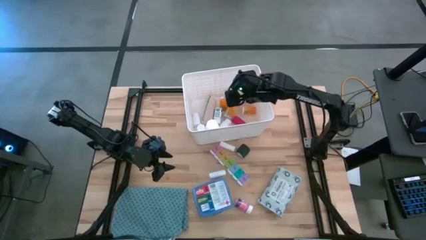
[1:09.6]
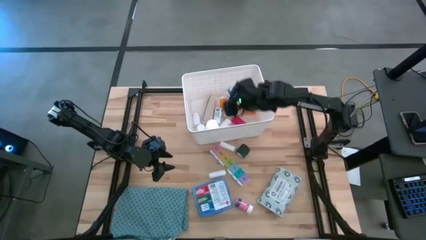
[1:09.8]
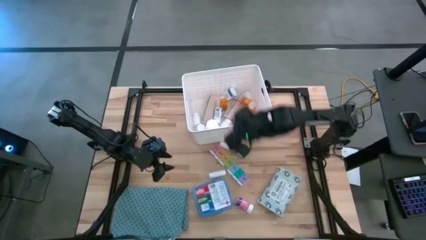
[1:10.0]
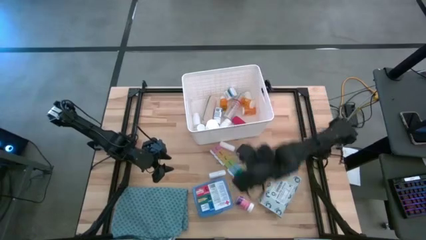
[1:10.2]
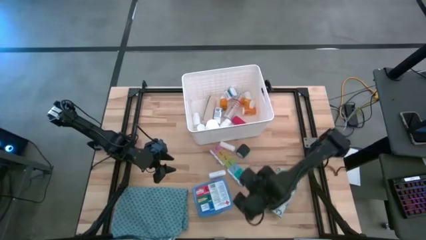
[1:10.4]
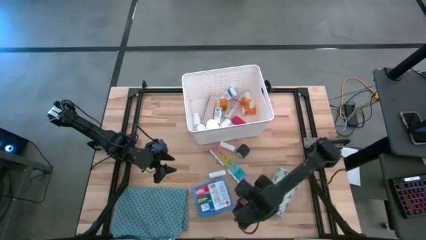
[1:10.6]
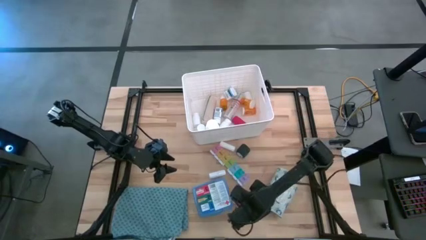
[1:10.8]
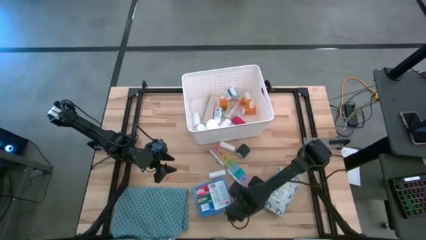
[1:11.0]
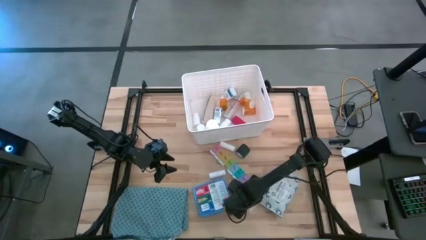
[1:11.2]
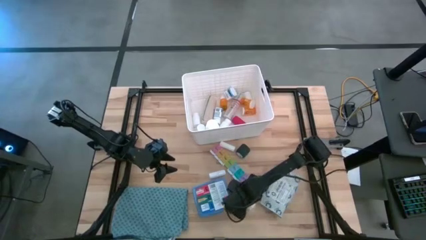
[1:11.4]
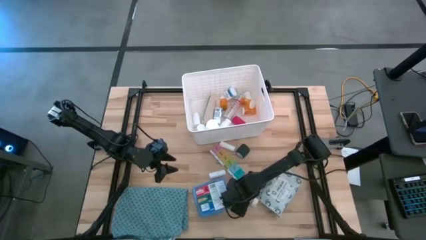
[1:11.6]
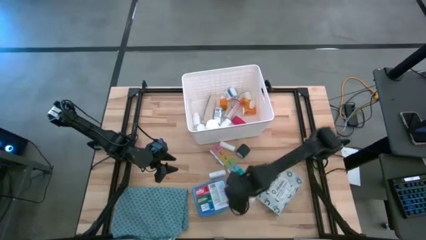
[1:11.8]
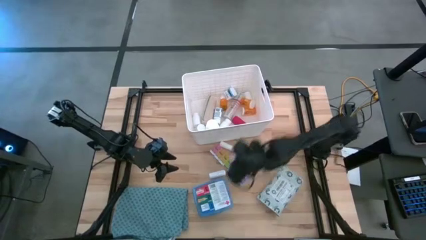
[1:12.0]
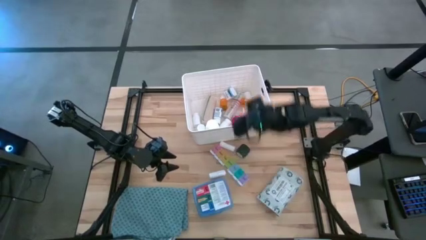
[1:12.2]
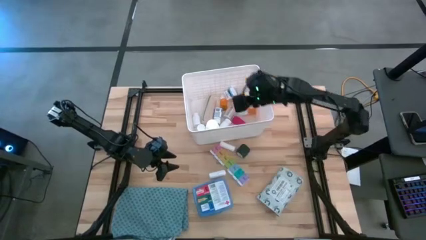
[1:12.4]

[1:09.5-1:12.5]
Task: Pick & place medical supplies in basket/bin
Put the pink medicine bottle into the bin

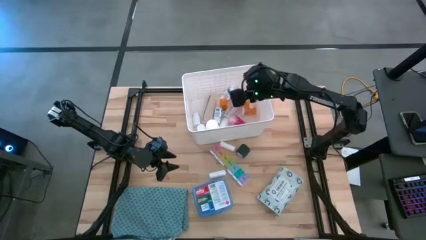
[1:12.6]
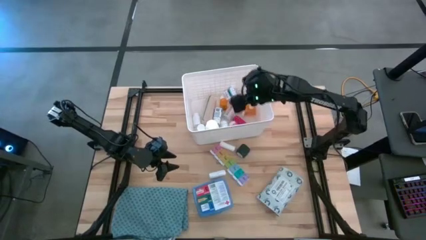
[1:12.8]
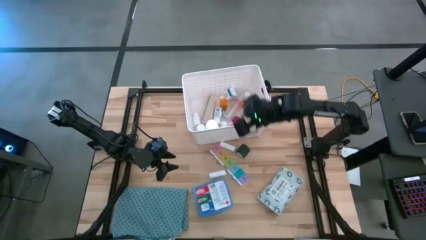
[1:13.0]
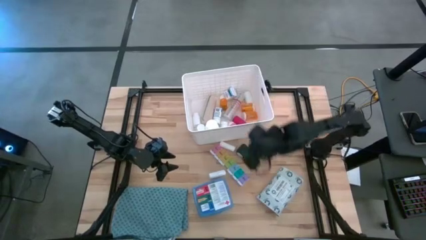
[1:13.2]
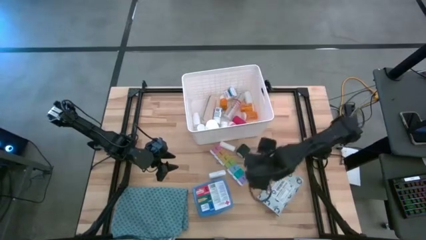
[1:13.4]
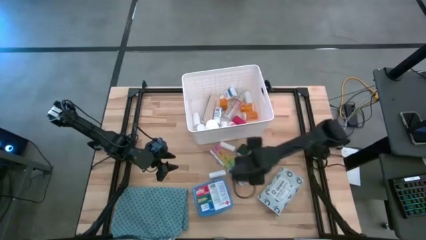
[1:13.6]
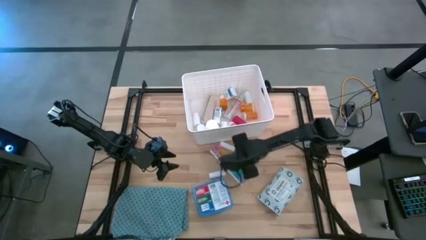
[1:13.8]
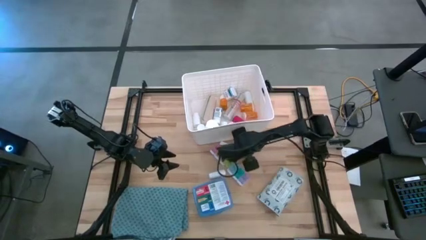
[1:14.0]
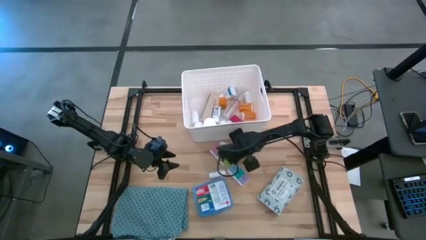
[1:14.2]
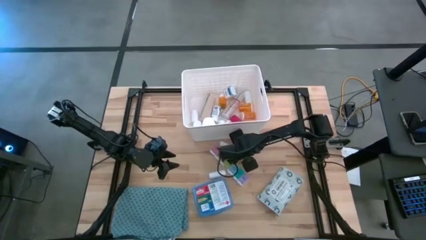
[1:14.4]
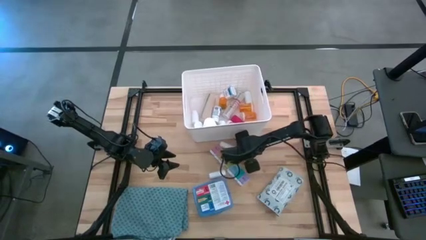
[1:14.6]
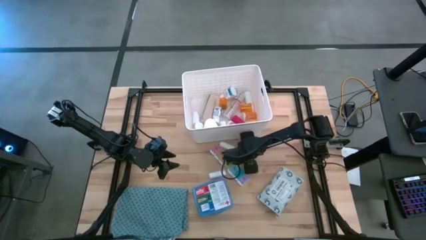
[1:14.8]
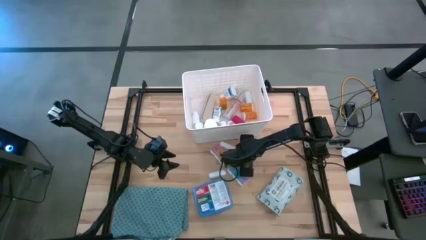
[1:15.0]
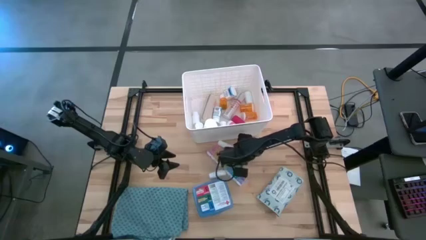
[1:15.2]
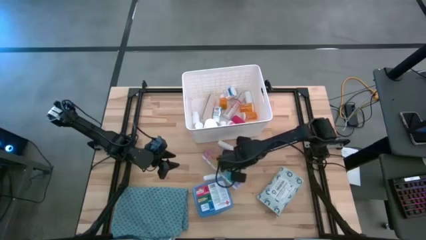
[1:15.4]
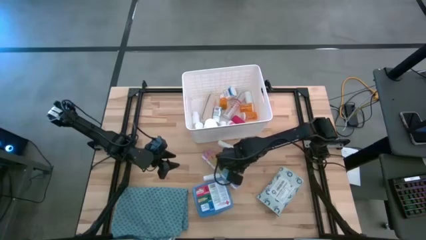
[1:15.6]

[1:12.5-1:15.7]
Put the green bandage into the bin

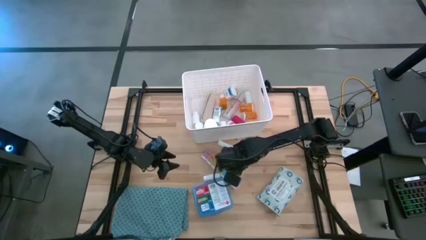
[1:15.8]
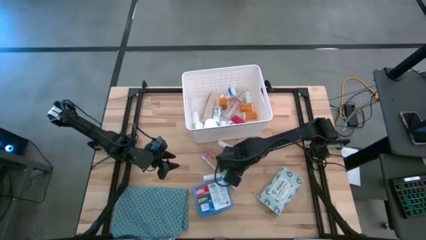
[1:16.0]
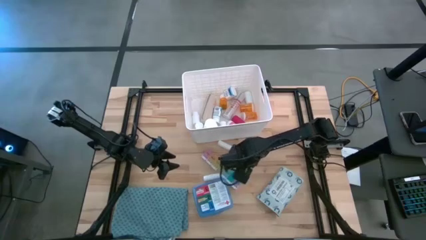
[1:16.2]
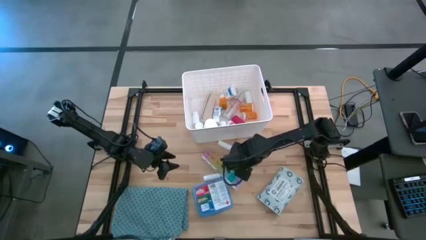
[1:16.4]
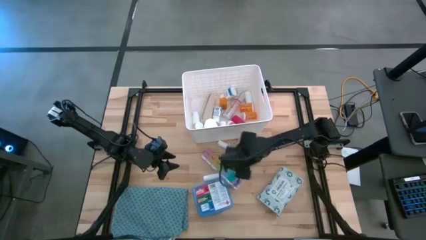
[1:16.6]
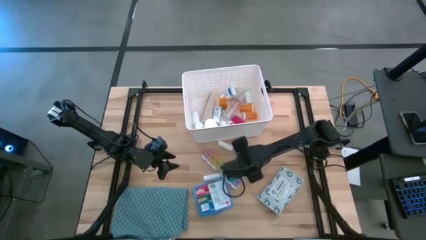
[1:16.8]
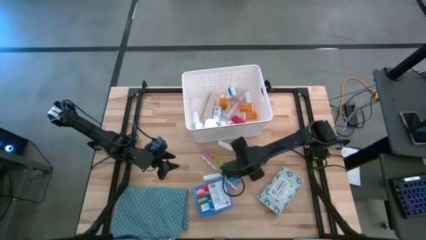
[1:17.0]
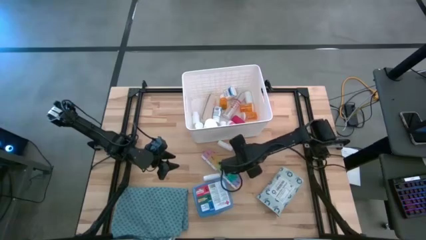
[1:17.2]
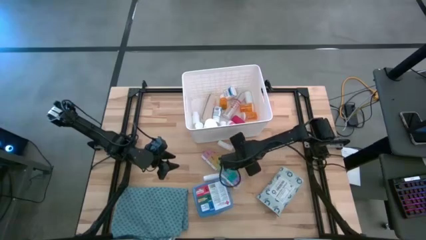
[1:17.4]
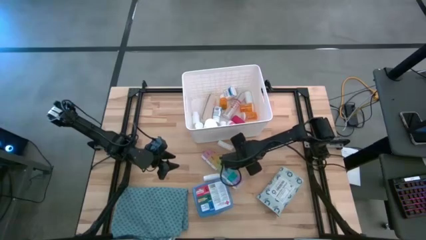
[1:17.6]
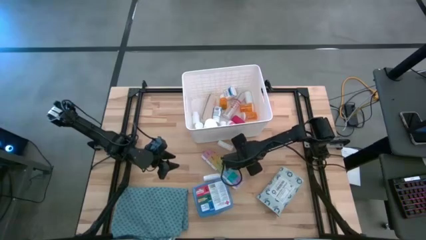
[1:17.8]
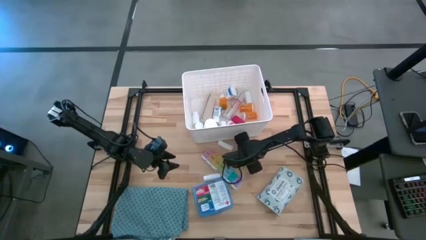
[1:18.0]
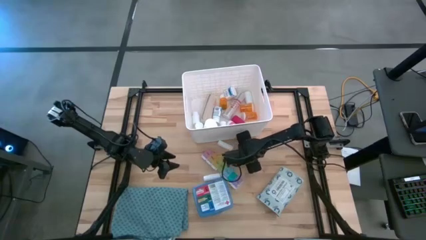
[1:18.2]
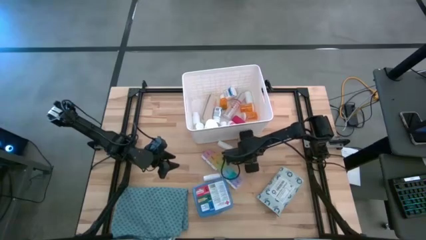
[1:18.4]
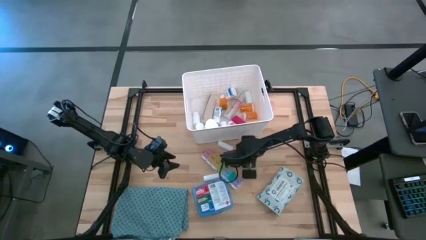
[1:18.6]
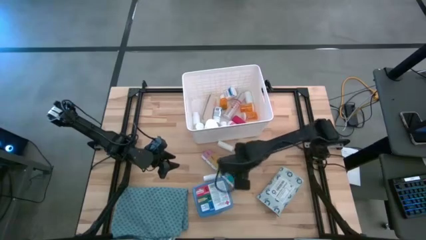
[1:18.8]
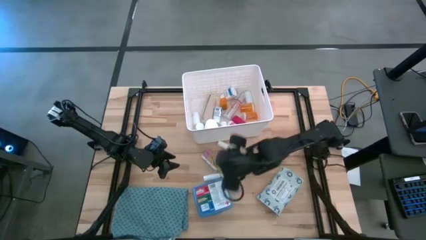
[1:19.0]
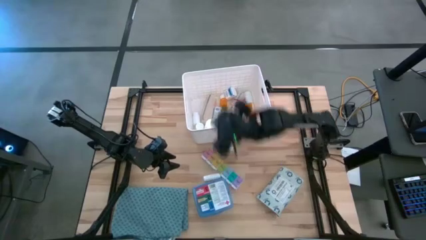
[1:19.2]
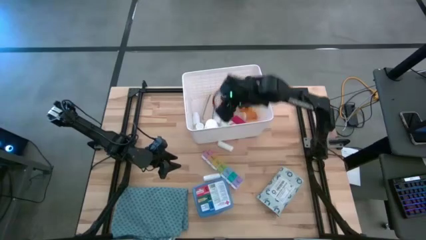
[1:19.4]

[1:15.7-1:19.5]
Put the green bandage into the bin

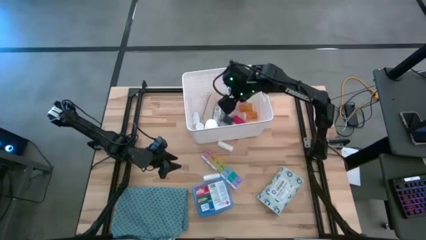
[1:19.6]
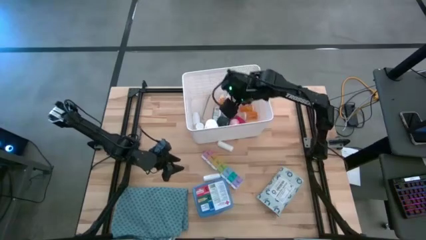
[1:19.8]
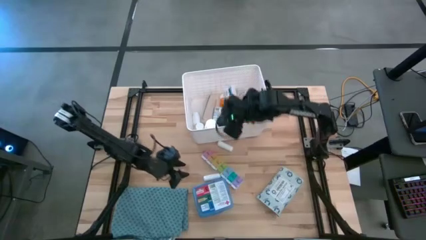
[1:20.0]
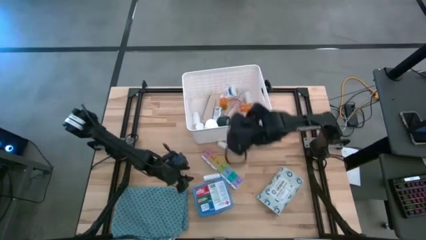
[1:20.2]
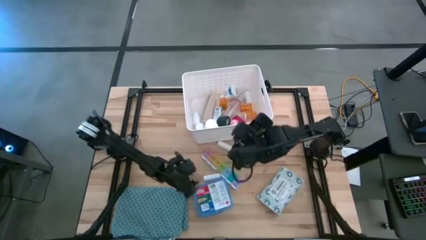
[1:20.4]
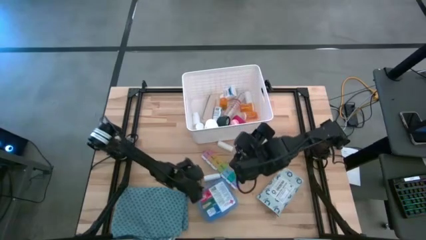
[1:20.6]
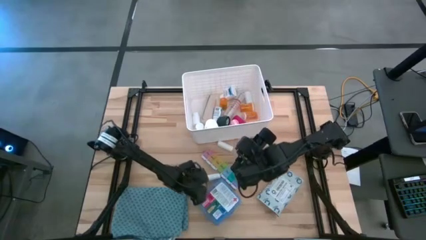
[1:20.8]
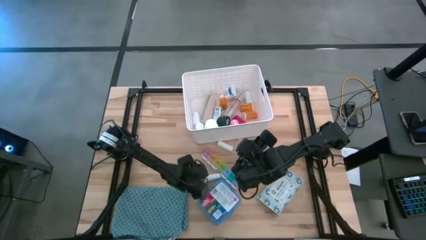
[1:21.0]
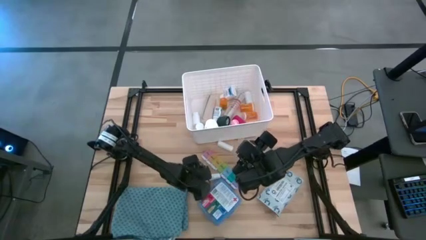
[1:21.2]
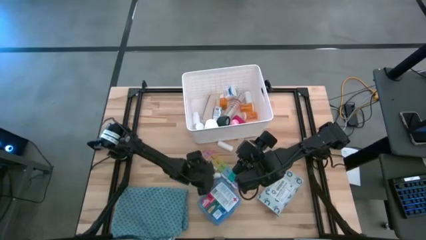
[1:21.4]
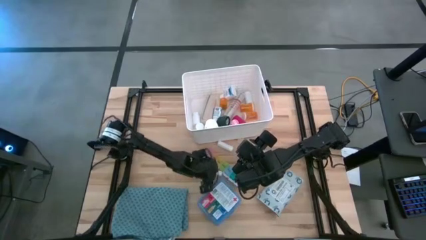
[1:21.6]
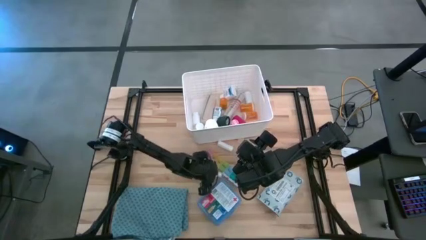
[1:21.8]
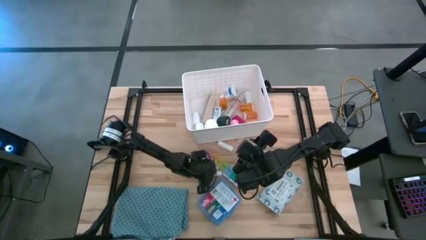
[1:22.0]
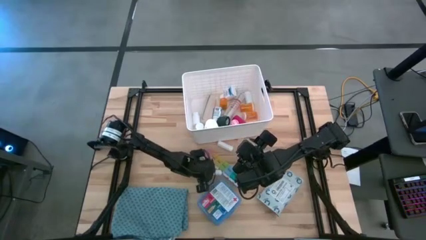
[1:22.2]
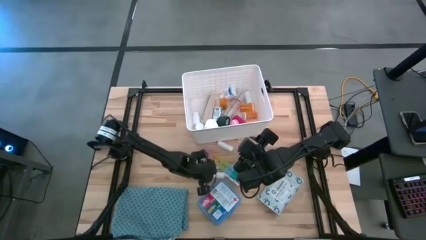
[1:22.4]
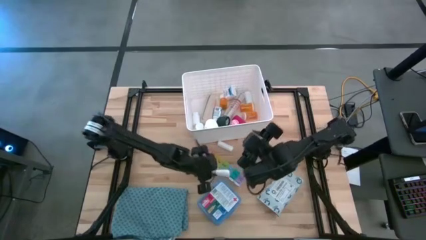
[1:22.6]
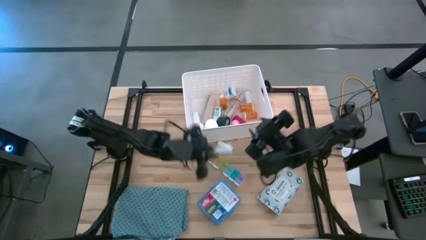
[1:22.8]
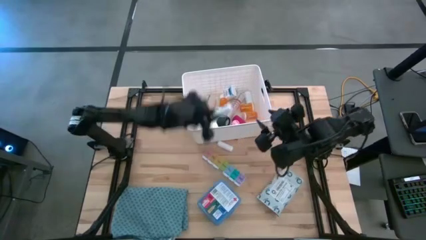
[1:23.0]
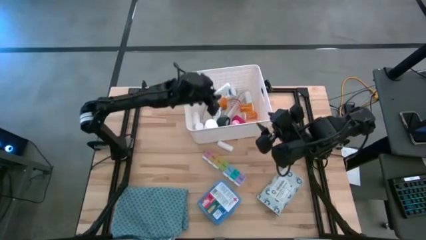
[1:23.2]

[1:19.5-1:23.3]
Put the rolled gauze into the bin

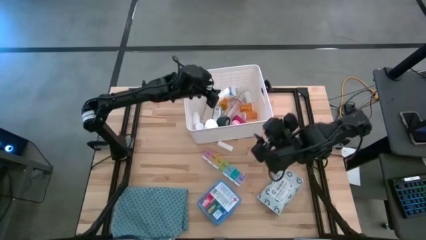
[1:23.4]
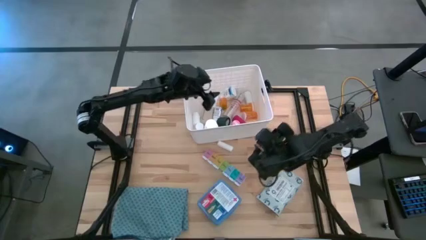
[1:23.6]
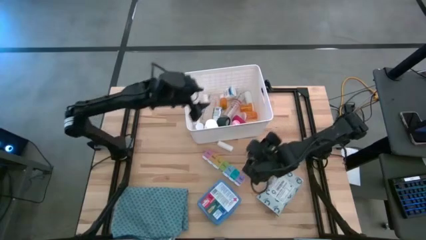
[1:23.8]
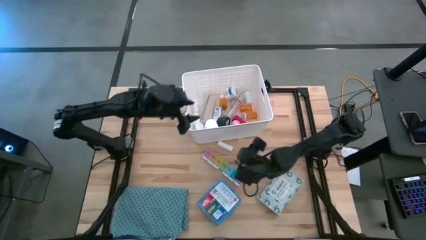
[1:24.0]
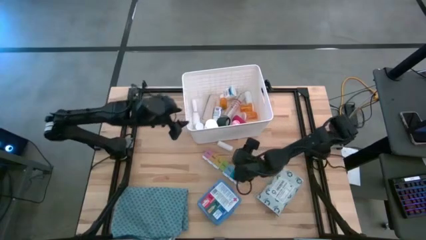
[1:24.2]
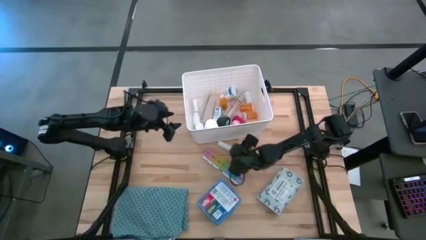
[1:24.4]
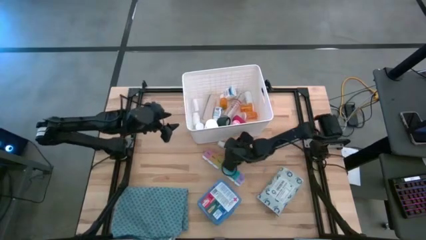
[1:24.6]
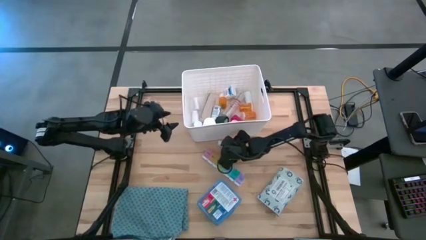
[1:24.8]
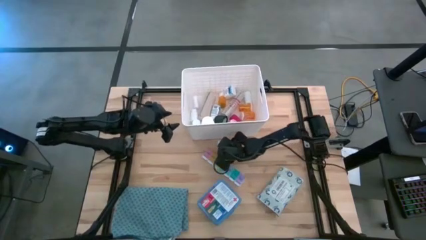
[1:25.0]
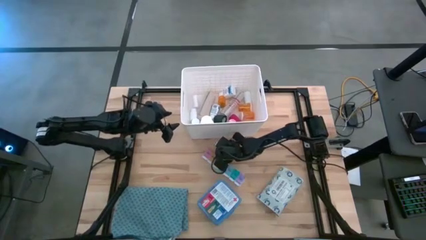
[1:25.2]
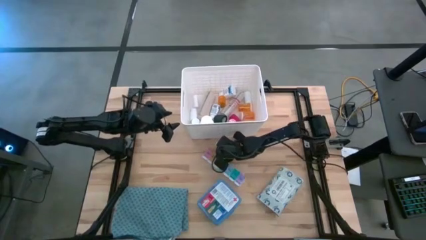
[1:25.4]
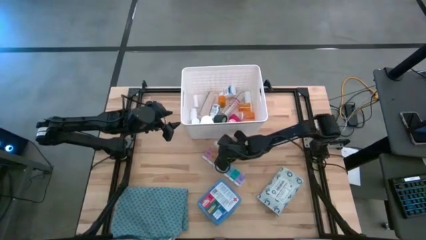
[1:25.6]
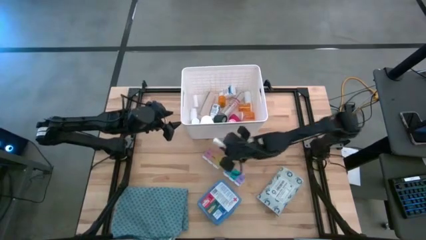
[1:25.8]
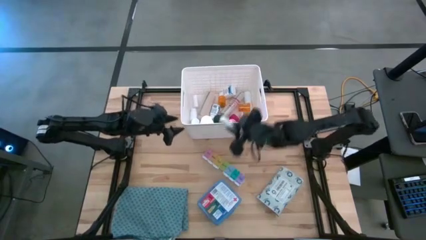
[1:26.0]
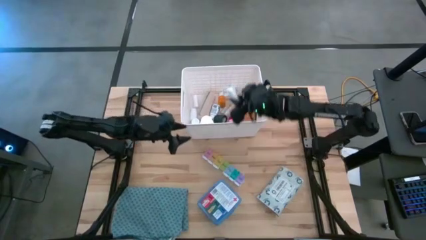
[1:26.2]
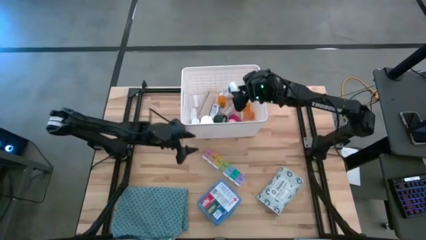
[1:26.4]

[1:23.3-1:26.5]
Put the rolled gauze into the bin
